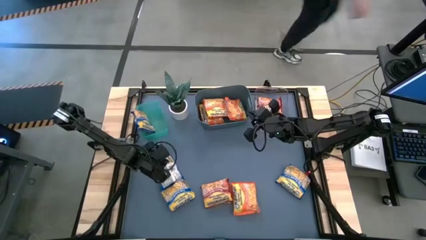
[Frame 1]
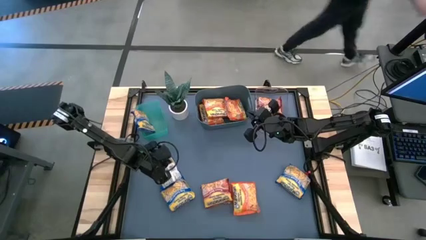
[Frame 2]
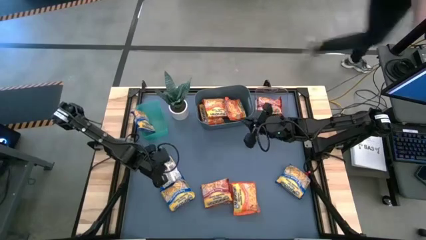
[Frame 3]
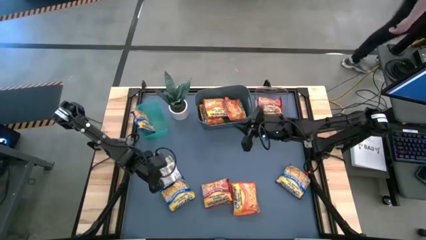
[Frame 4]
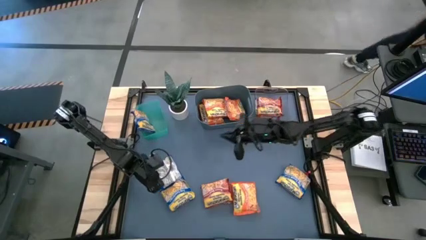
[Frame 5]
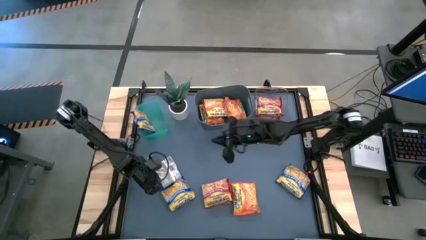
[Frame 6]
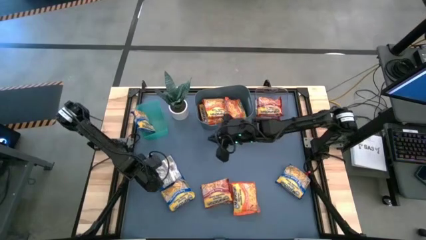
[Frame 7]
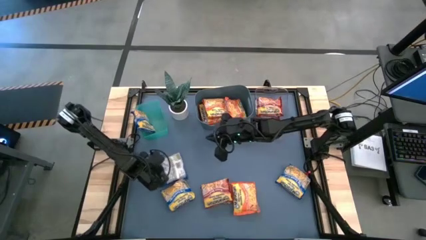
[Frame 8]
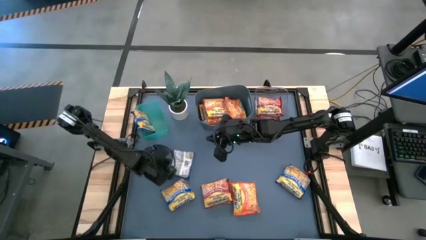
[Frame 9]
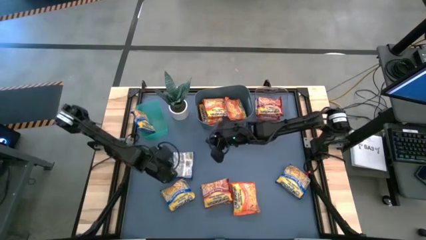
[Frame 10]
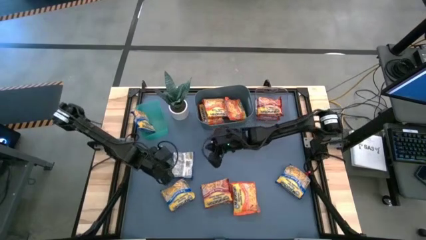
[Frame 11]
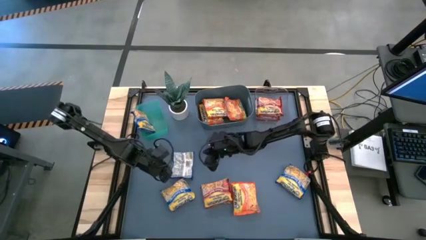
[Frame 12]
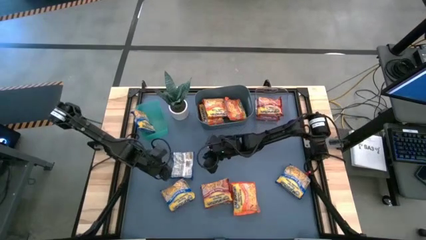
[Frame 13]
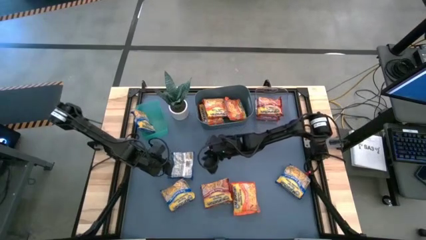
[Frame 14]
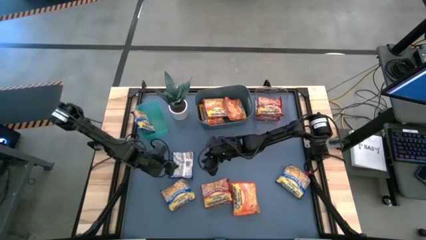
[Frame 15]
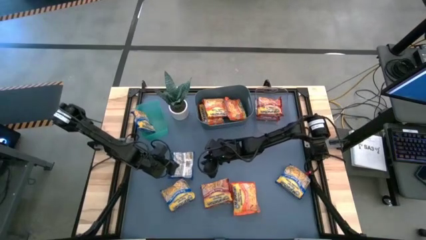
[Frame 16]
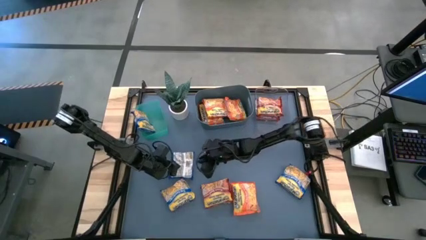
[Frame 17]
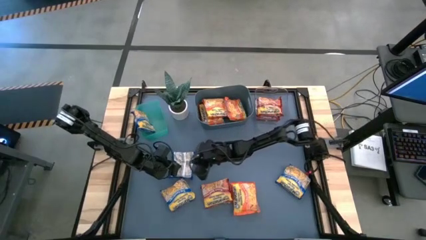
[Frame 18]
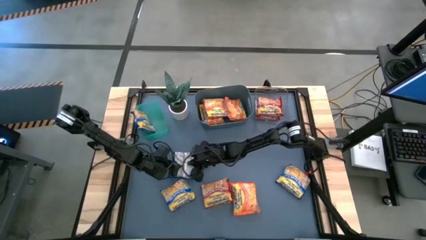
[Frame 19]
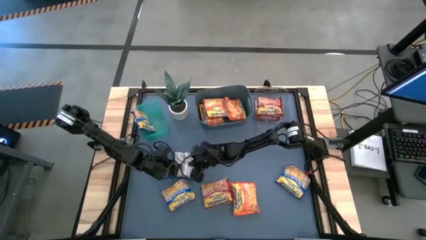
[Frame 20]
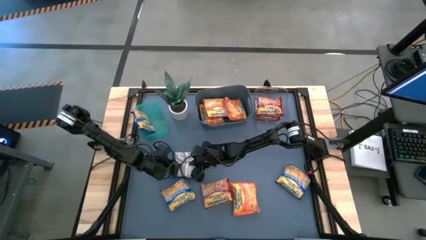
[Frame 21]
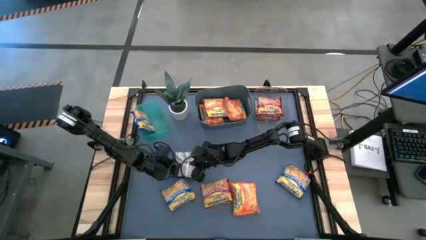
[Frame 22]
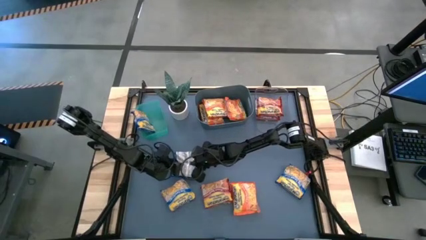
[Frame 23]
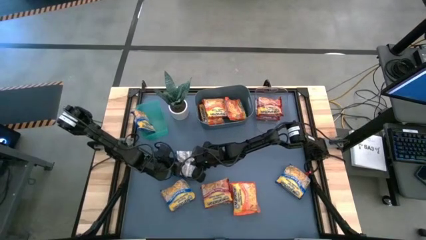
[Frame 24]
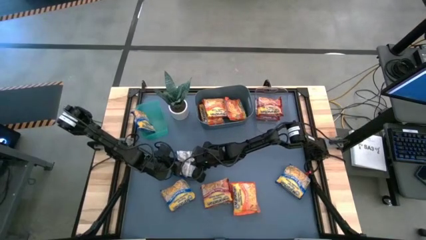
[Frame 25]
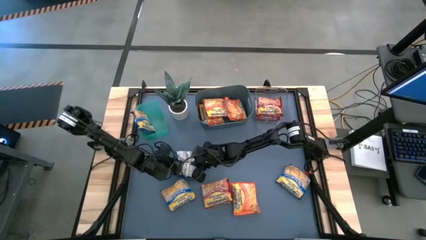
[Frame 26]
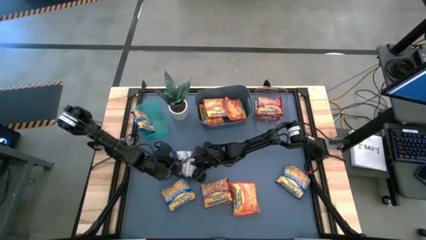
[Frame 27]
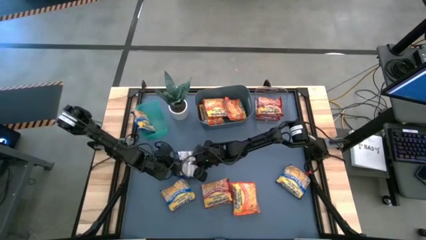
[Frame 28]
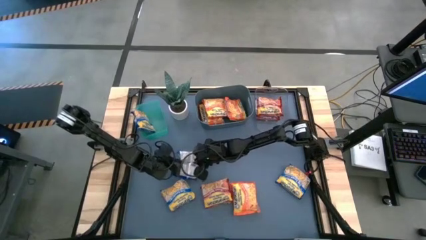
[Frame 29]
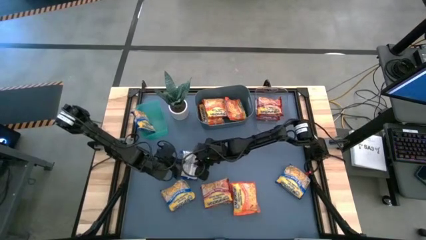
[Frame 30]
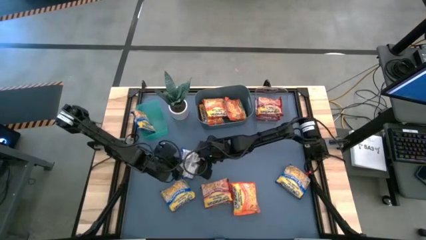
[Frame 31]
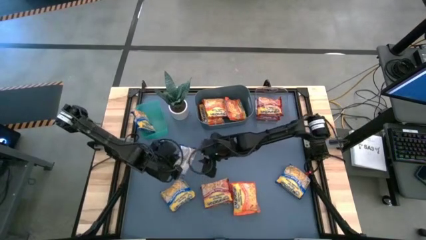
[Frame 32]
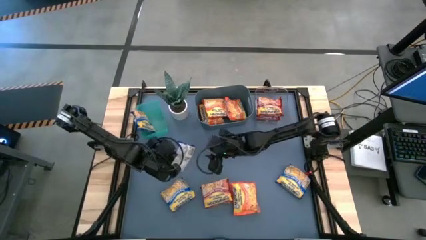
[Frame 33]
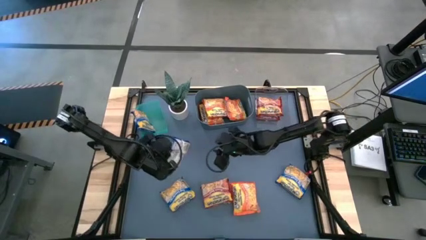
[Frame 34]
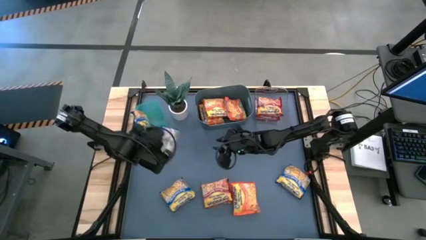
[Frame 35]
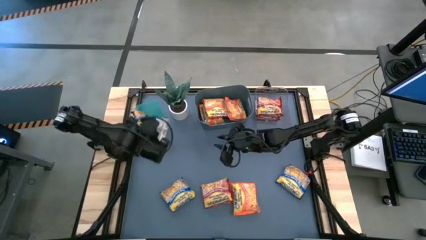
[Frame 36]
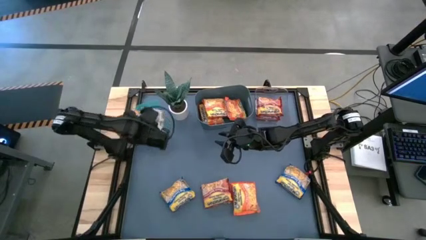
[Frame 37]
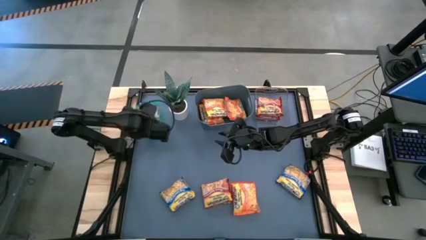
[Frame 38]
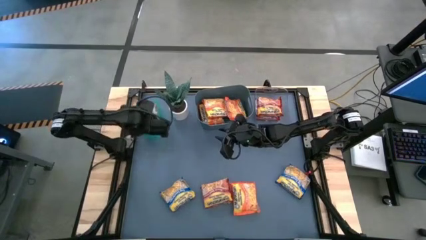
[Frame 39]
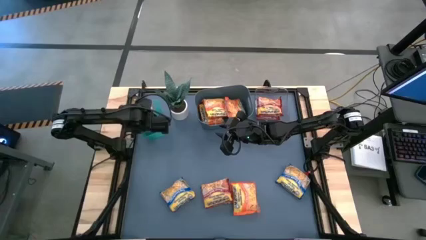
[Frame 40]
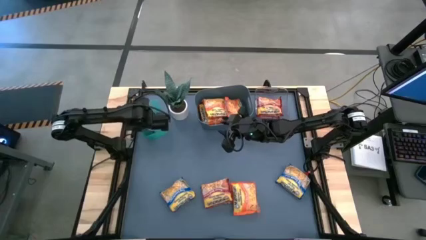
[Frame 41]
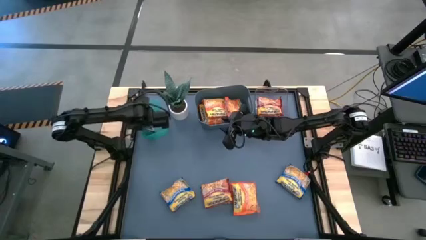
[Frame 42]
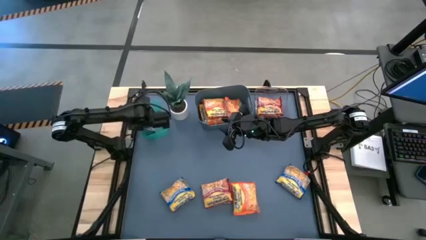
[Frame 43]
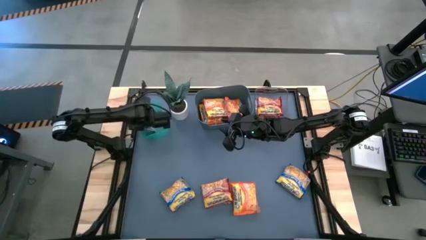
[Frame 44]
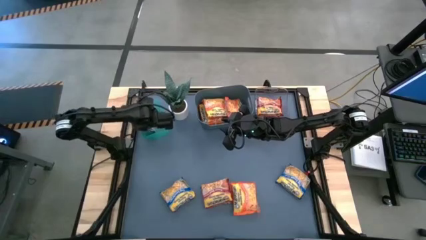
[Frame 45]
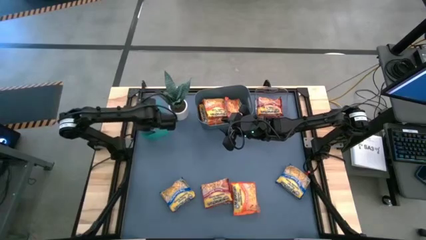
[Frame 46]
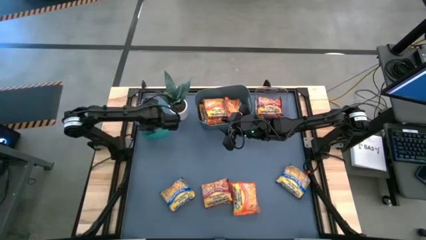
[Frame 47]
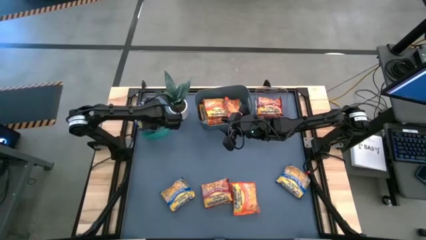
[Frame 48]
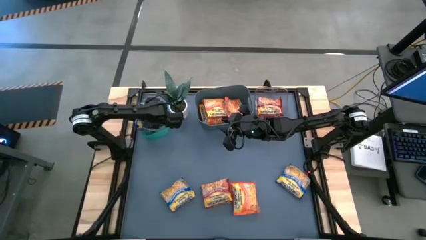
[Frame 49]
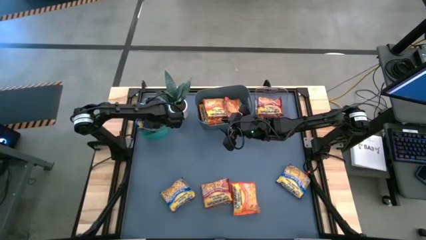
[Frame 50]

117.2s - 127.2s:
Task: Sort Maruchan noodles
Put the blue noodle pack into the green bin

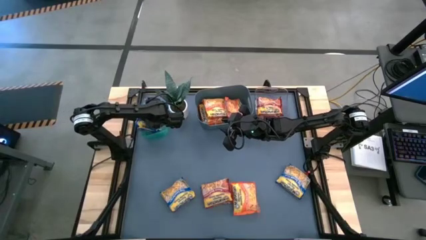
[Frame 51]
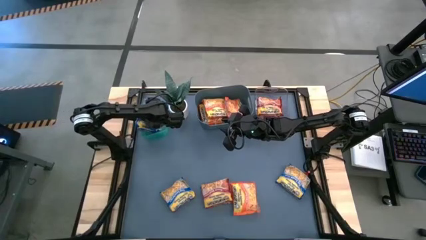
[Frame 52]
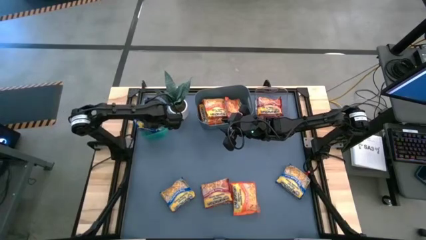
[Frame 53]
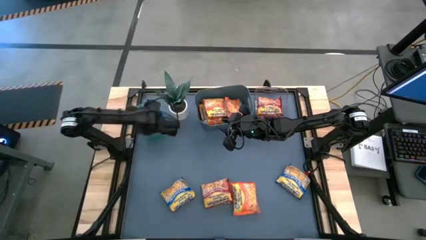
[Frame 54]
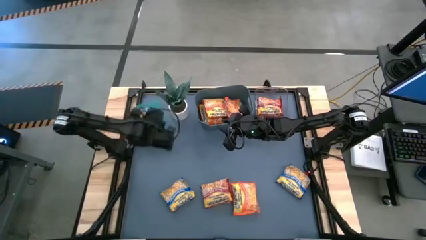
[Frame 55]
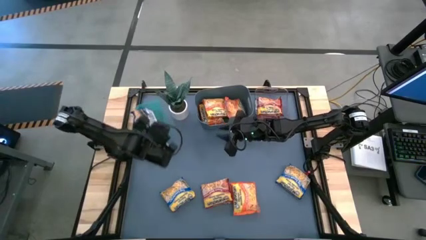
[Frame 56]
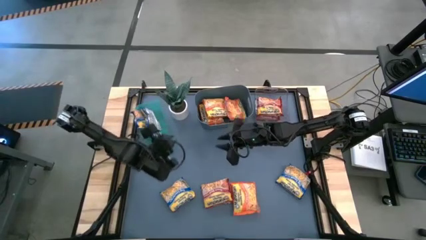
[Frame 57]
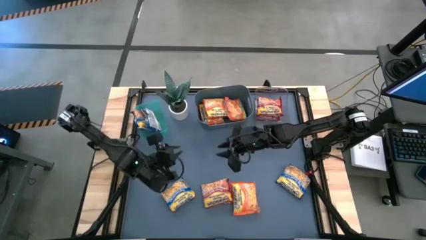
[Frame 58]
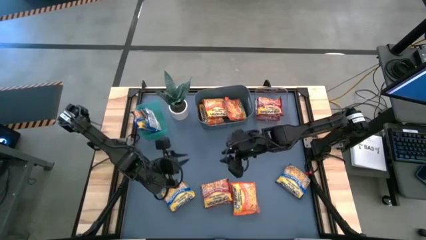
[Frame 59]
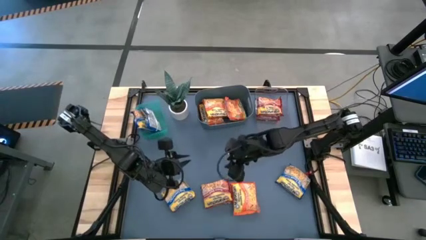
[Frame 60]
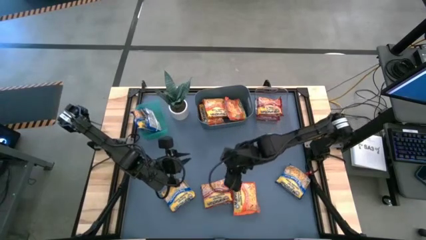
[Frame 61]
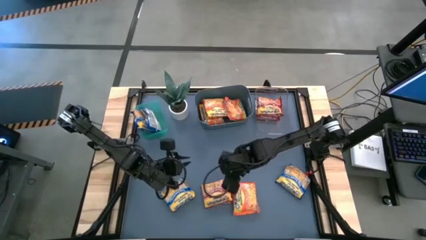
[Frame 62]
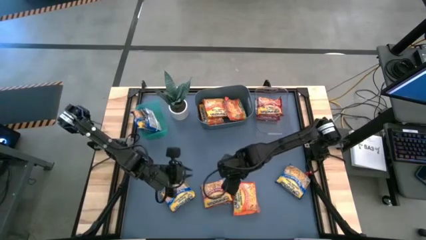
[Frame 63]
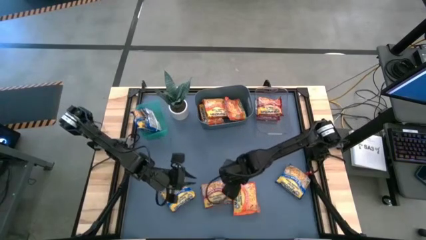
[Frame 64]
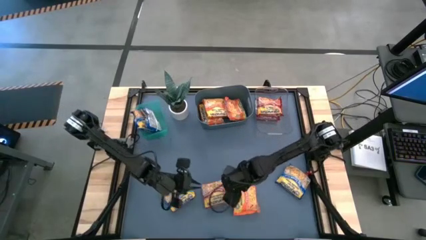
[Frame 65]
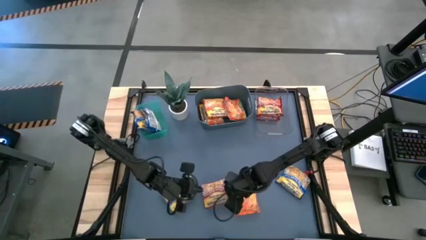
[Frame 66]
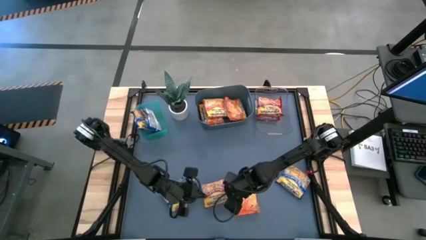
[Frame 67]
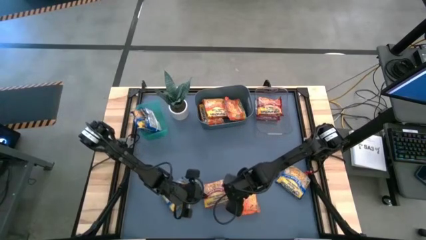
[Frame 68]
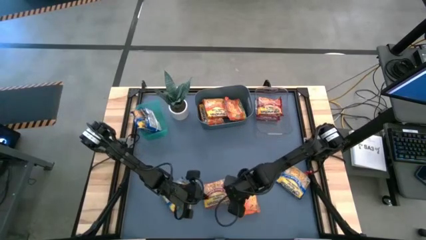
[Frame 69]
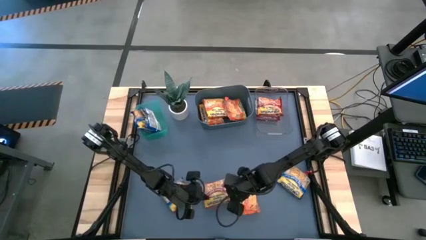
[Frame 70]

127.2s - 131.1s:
Put the red noodle pack into the transparent bin

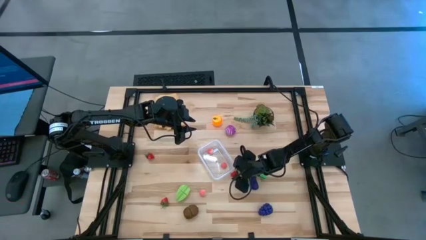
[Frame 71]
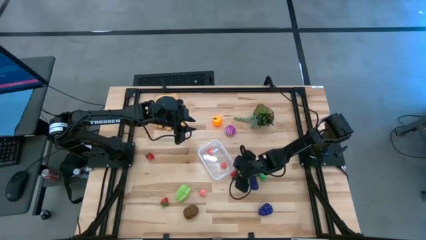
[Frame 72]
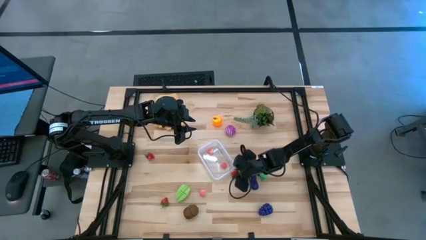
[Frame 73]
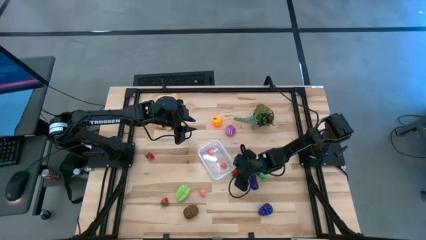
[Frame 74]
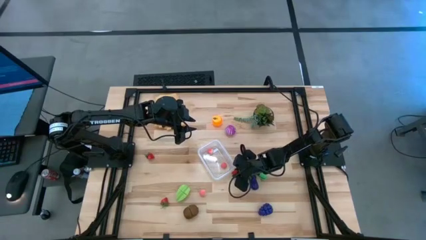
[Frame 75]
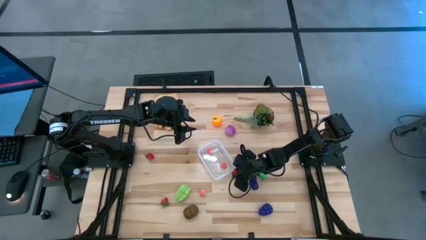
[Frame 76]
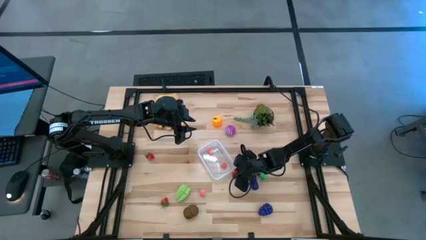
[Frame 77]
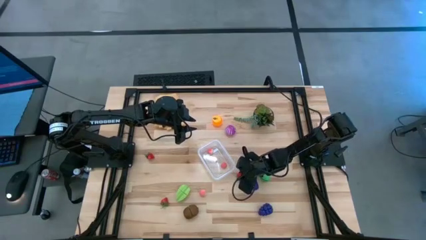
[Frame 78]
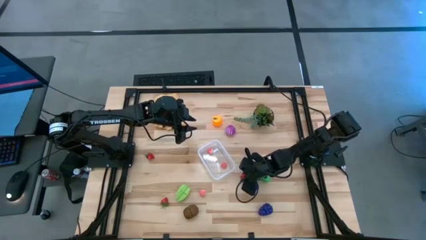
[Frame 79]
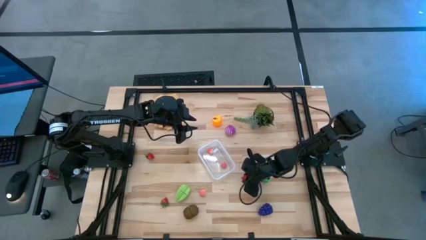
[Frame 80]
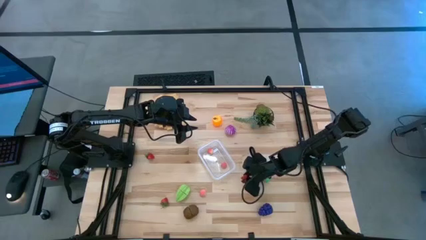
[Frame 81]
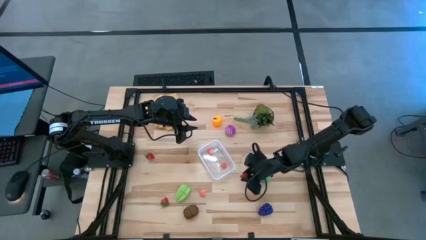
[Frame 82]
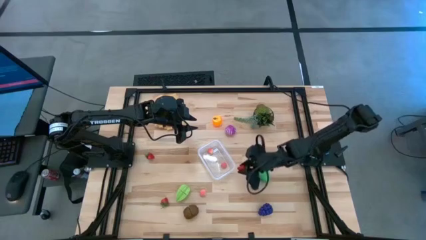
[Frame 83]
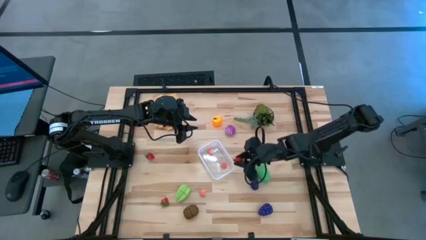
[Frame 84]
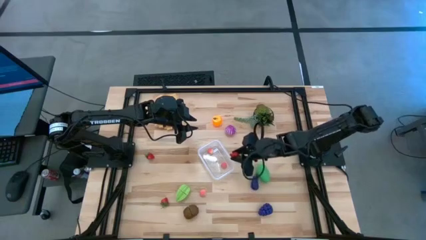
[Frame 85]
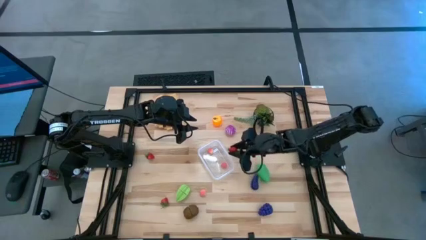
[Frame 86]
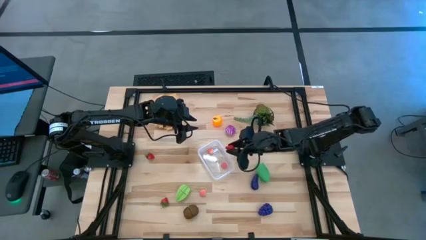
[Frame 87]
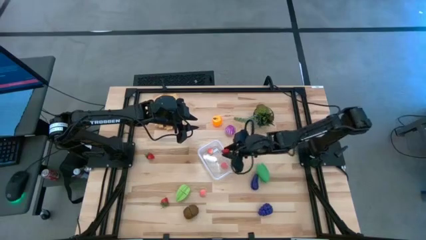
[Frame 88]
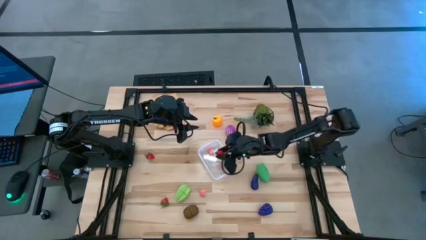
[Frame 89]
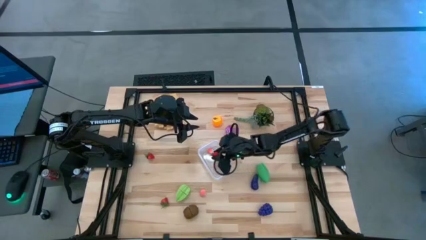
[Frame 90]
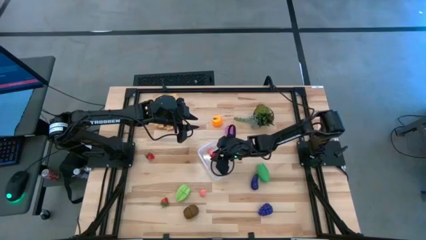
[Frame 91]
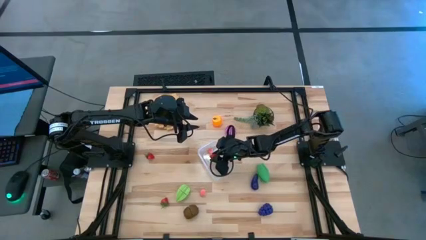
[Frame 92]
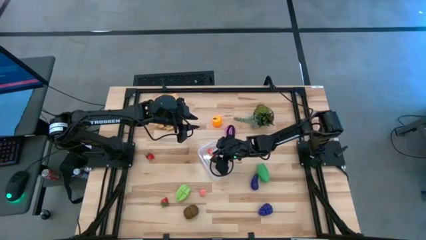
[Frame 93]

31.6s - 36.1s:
Task: Pick and placing Produce into tupperware
Put the top right red strawberry into the transparent bin
